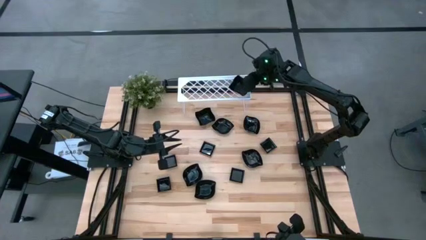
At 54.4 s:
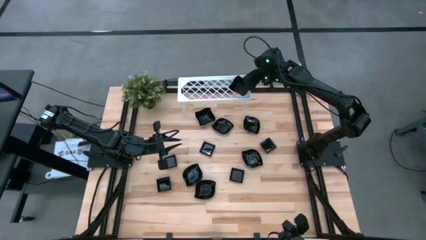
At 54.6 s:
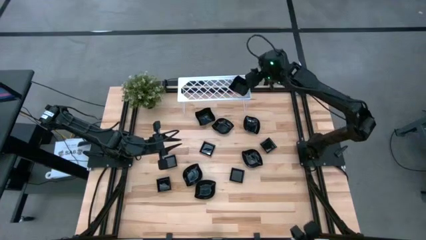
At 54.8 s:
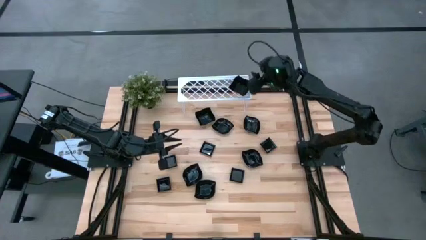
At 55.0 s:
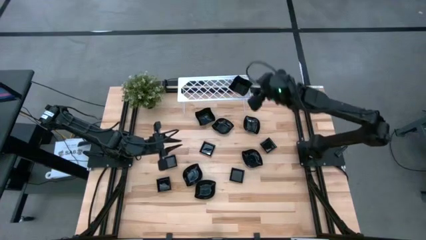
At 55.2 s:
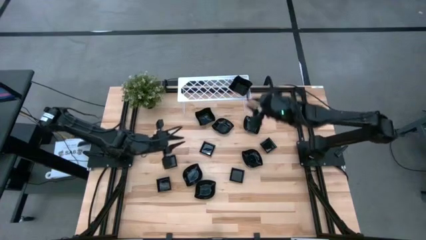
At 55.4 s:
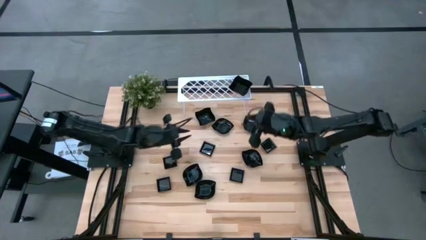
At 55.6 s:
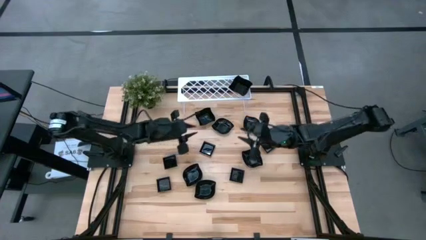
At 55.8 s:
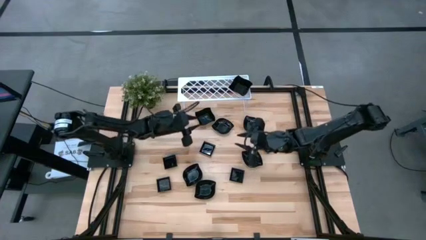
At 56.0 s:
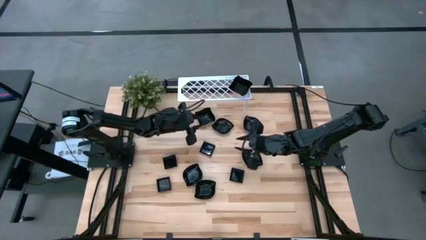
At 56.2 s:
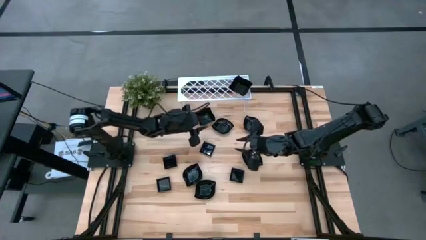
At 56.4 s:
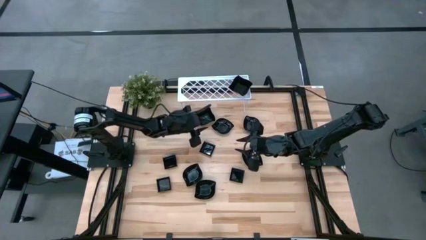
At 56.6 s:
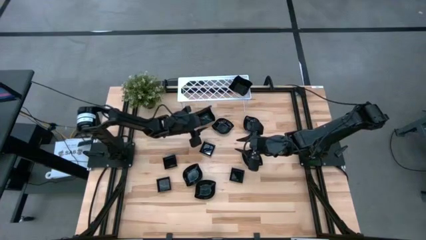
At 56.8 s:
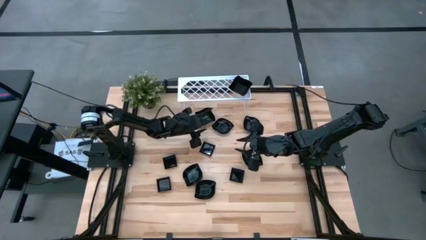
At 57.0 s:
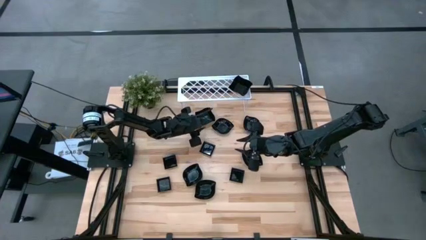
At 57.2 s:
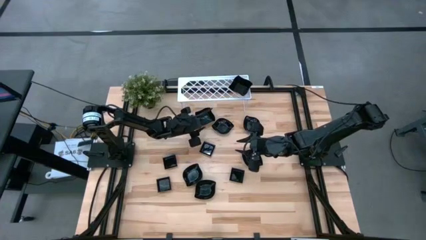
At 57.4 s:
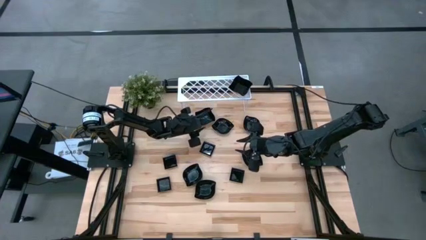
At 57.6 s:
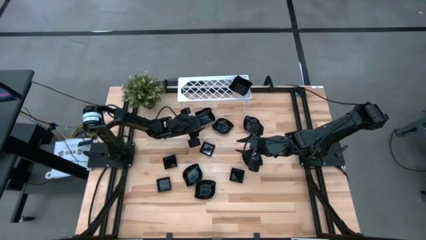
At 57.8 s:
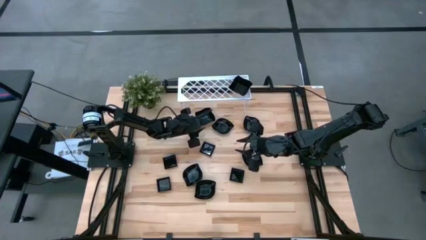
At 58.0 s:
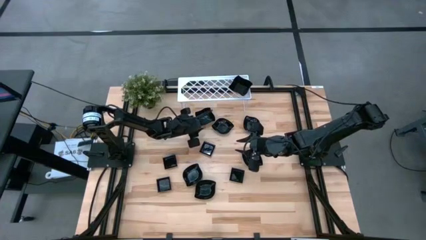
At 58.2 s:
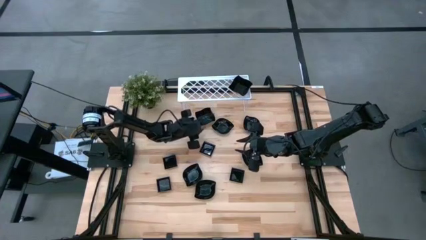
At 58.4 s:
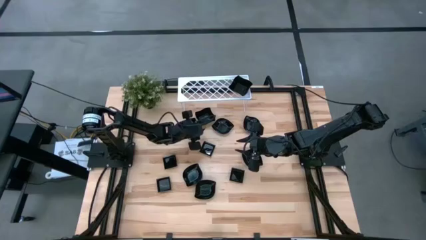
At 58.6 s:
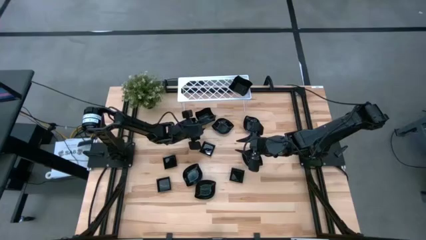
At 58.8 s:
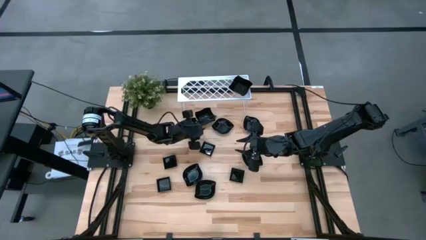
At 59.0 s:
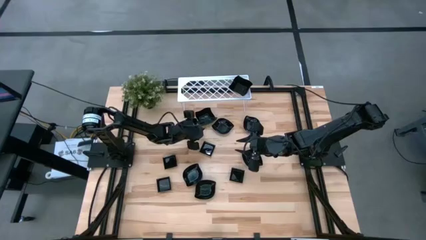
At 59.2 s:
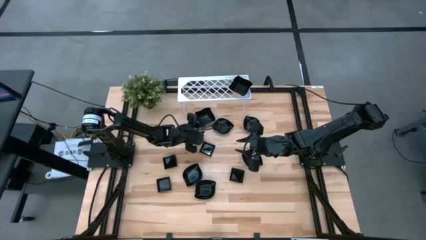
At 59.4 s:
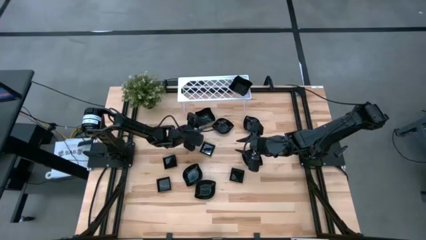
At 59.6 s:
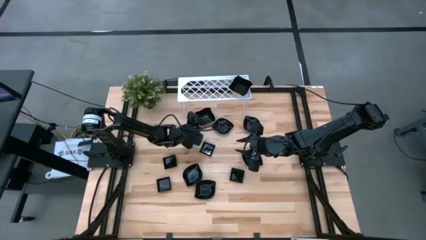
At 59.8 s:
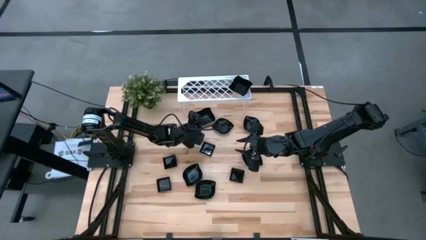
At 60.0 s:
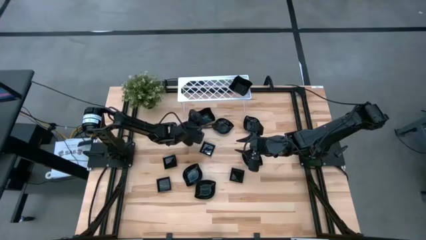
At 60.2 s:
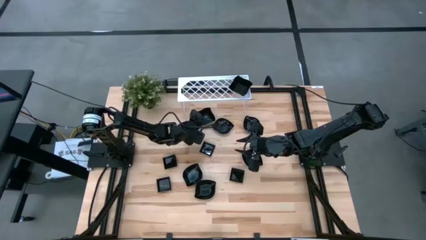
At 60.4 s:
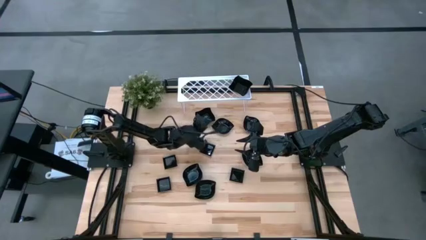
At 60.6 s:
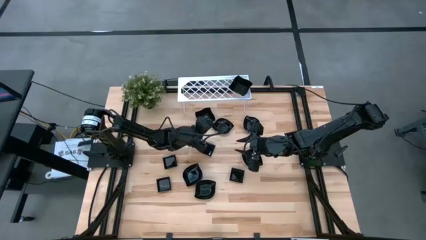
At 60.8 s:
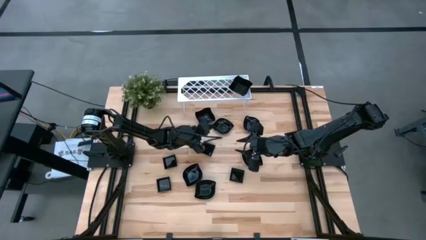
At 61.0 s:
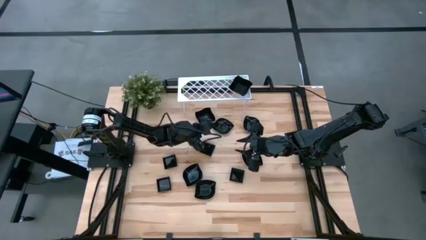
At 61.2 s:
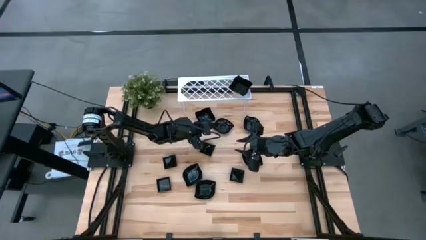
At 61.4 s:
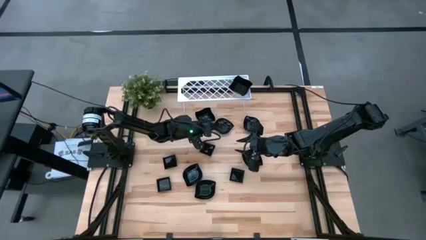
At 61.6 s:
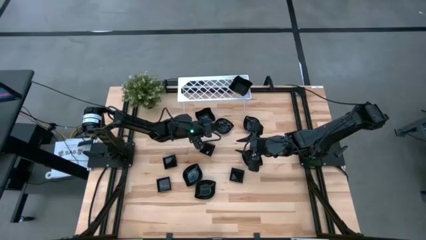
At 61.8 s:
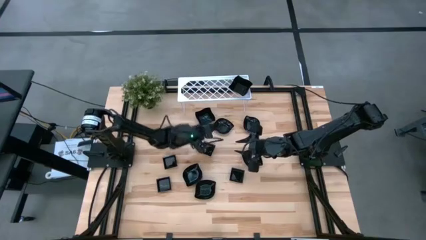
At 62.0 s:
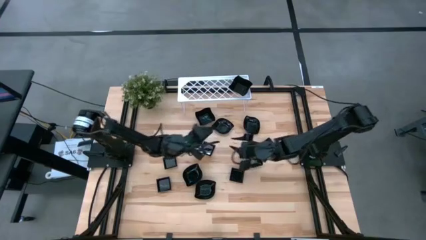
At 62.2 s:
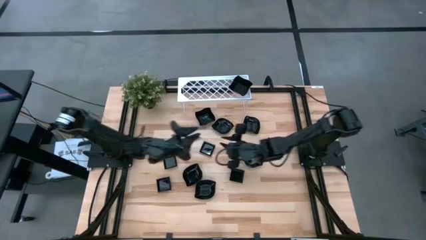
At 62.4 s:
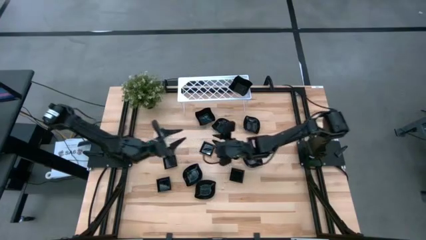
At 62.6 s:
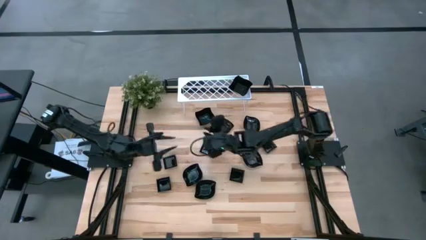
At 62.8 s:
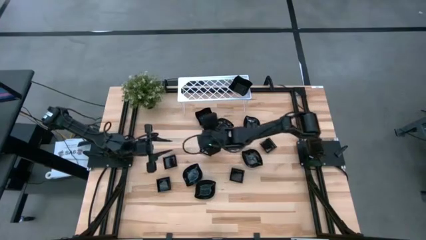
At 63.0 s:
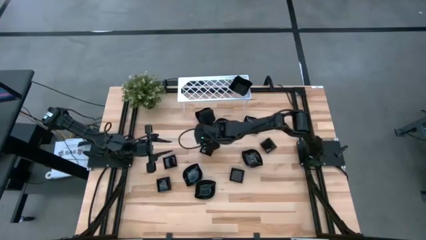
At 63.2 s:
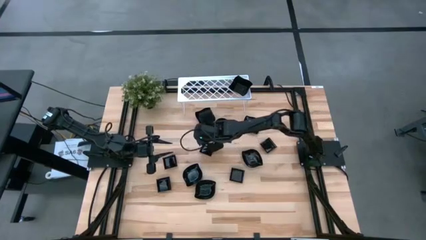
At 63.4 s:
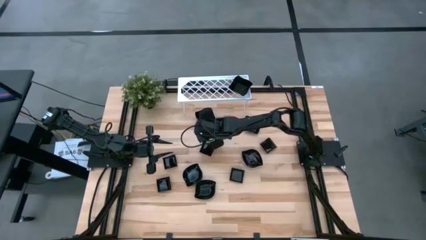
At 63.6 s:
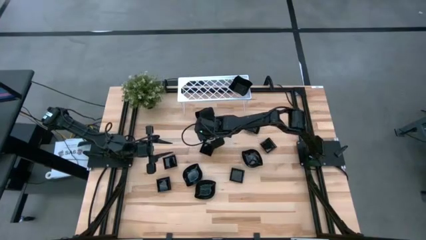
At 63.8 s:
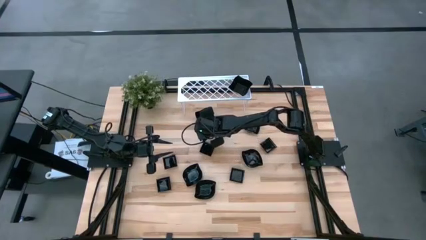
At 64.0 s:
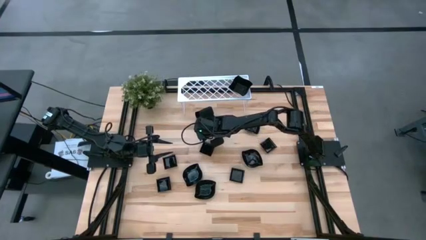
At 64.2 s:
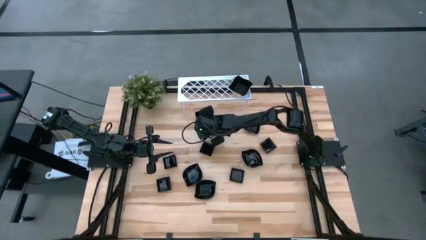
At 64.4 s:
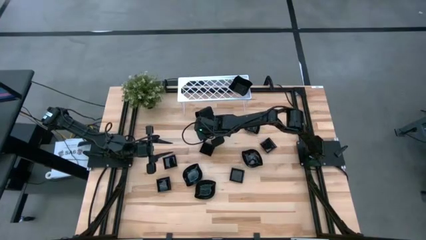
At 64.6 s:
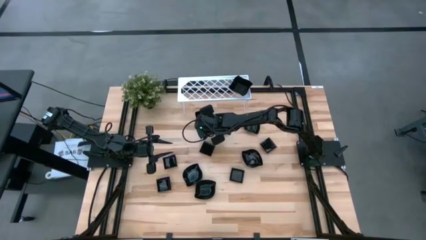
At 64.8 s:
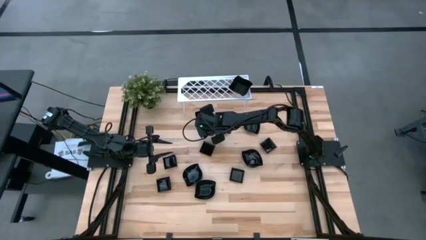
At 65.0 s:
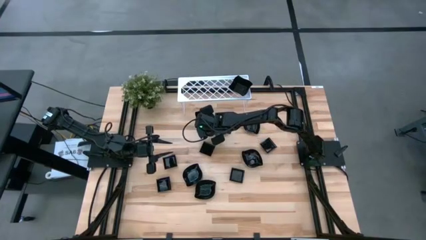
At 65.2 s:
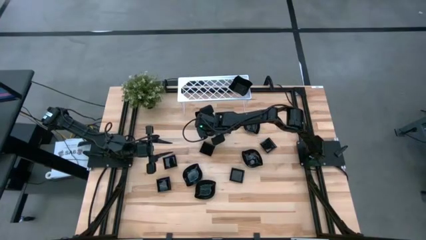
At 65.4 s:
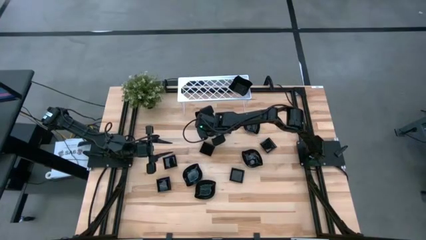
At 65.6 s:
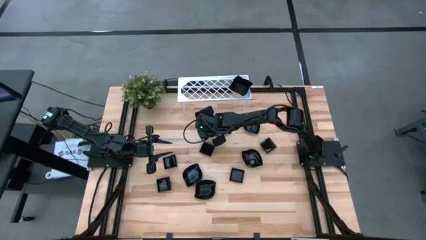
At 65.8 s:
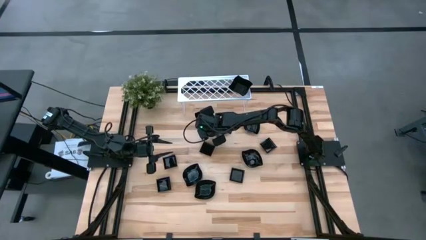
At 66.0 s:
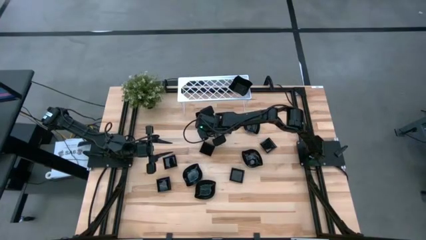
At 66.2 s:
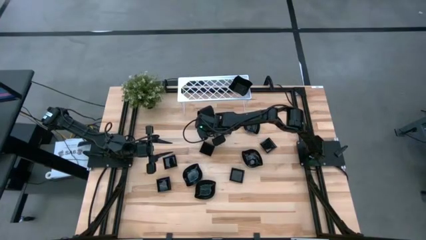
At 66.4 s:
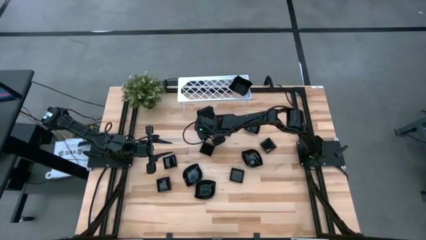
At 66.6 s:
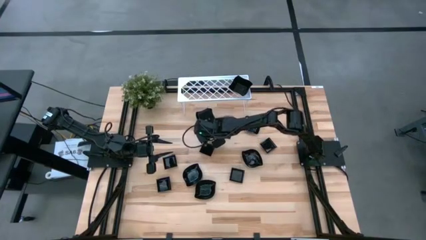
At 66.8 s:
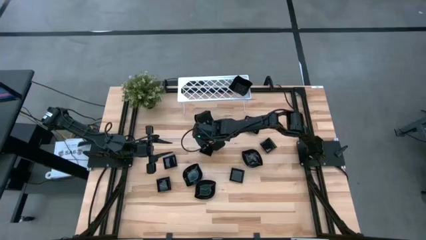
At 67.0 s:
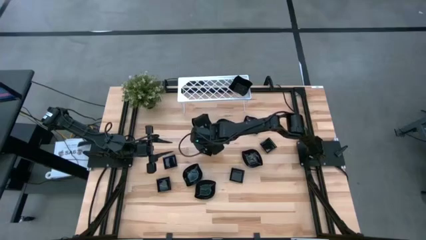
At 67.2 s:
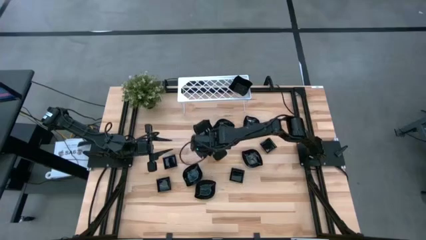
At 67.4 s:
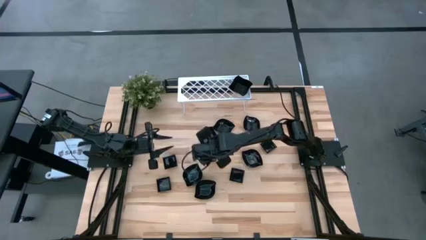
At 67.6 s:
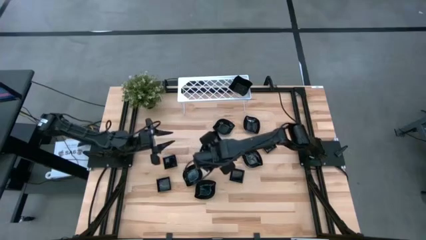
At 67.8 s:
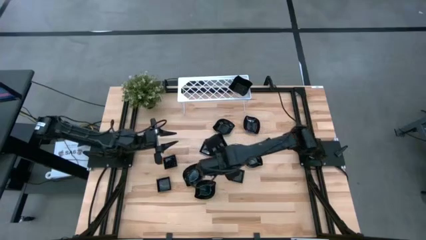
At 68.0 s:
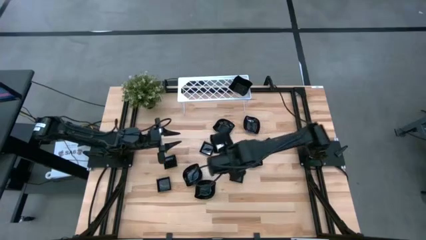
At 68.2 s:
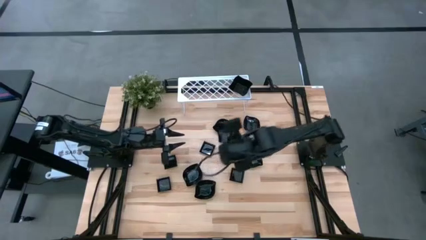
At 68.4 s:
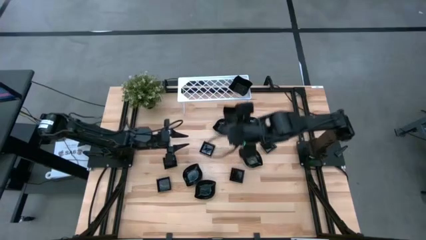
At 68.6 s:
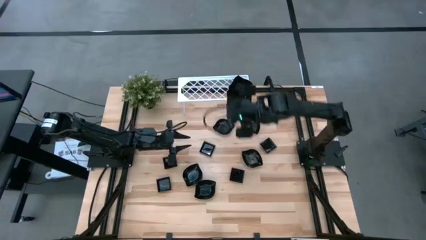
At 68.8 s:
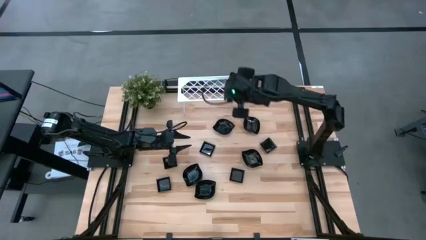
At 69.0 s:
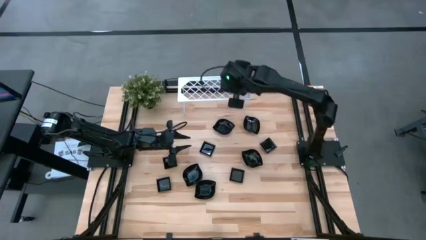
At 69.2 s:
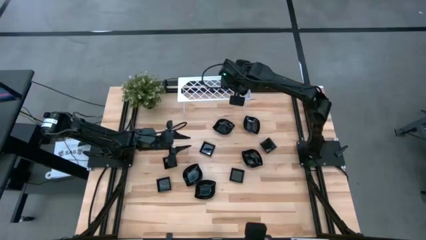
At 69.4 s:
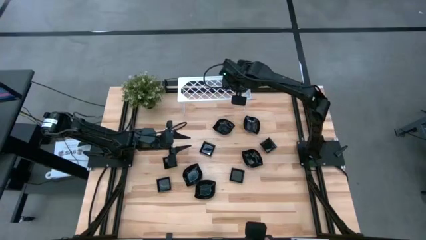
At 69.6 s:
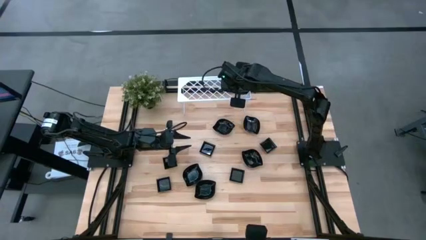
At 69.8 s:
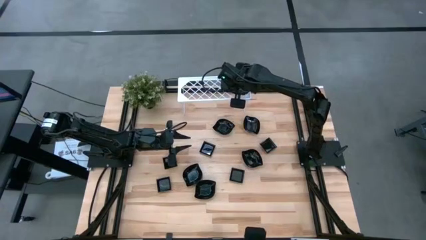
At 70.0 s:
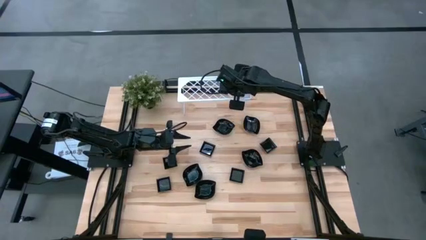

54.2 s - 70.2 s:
Task: Pick & Place Mini shaped plates
Stack the black distorted square plate on top of the black distorted square plate on the shelf
